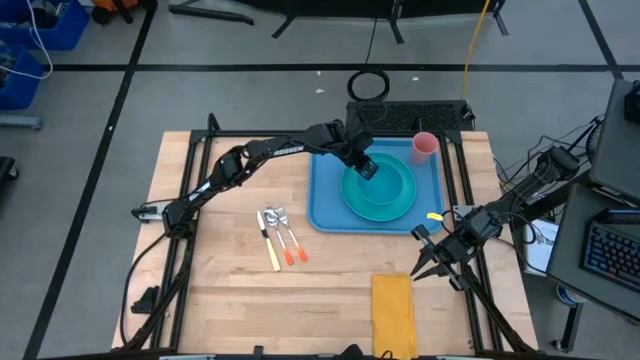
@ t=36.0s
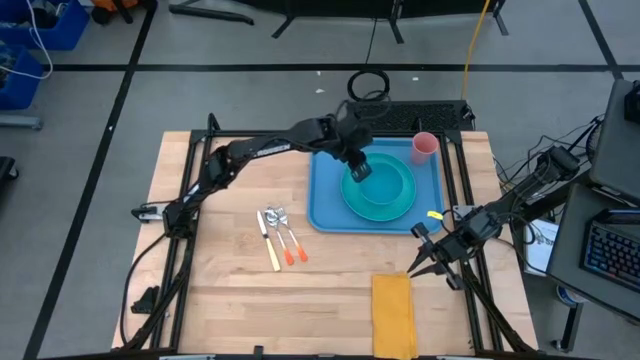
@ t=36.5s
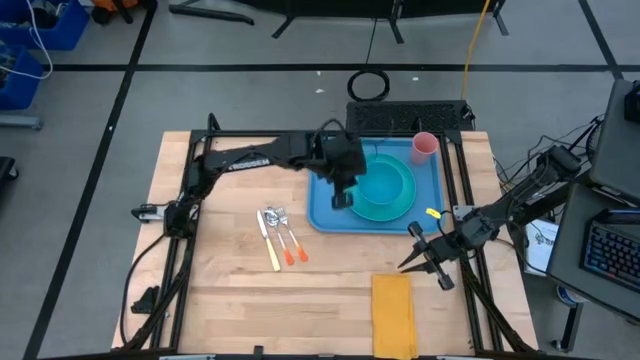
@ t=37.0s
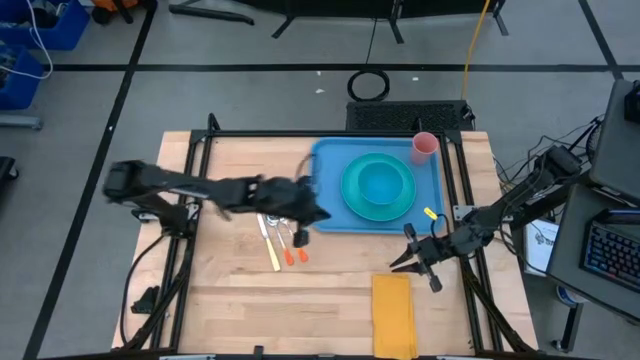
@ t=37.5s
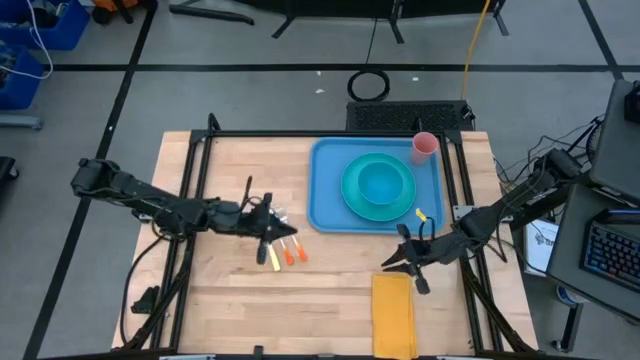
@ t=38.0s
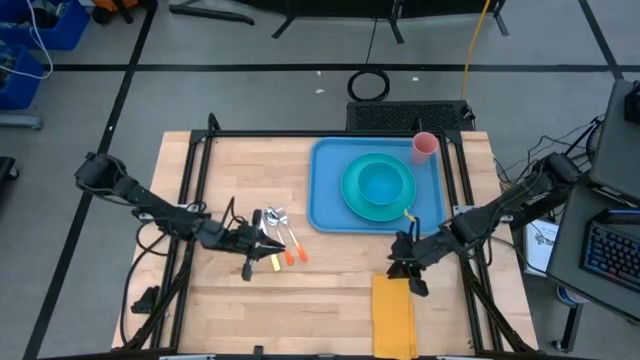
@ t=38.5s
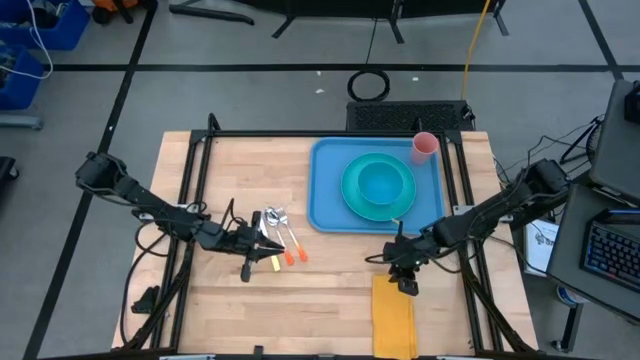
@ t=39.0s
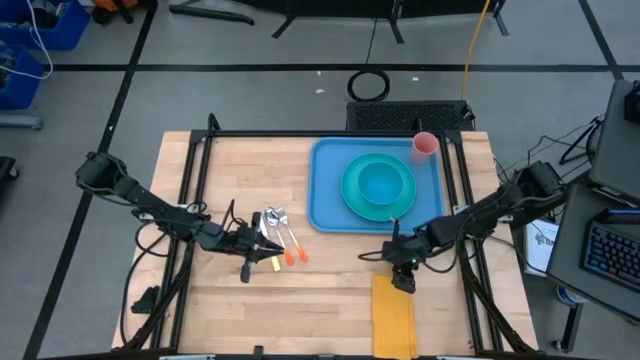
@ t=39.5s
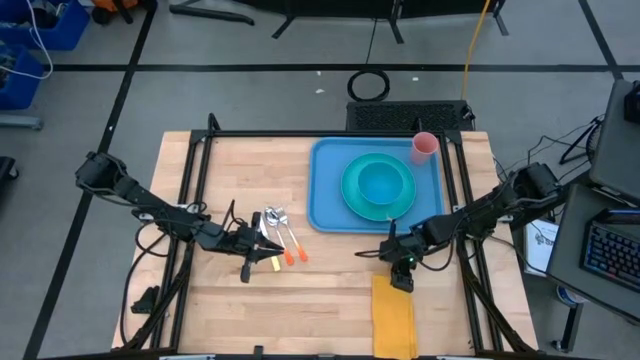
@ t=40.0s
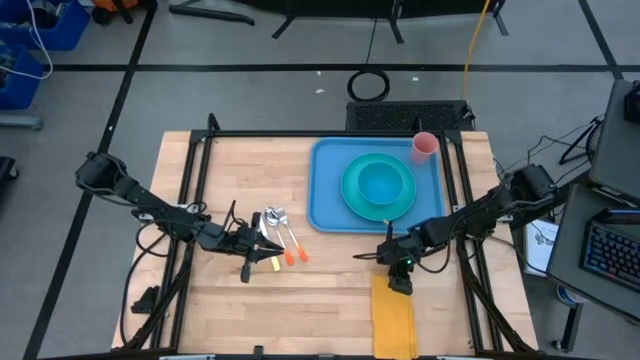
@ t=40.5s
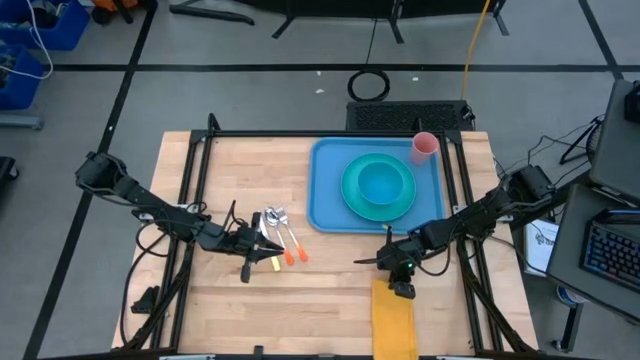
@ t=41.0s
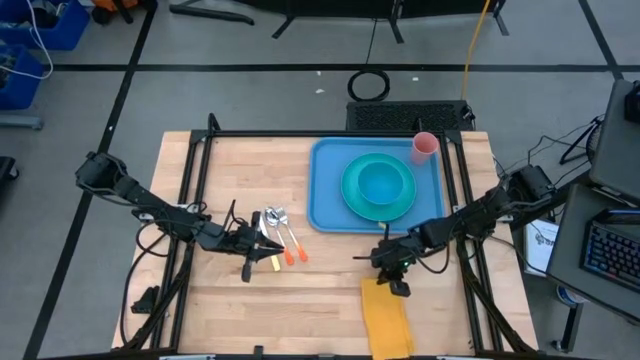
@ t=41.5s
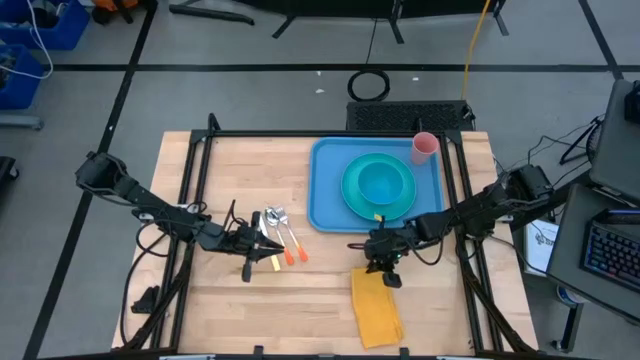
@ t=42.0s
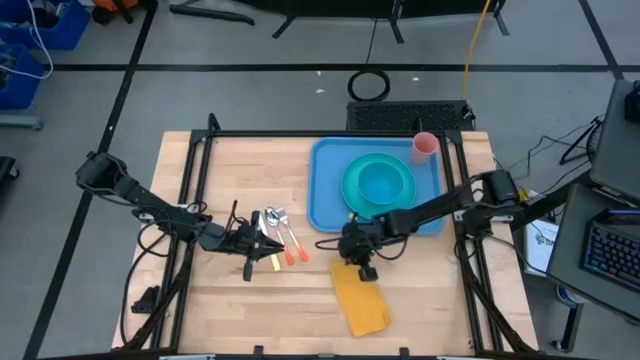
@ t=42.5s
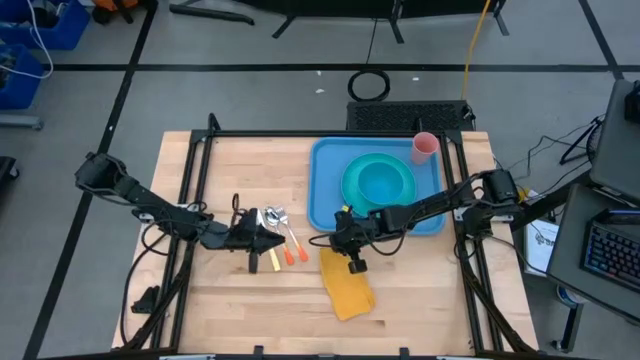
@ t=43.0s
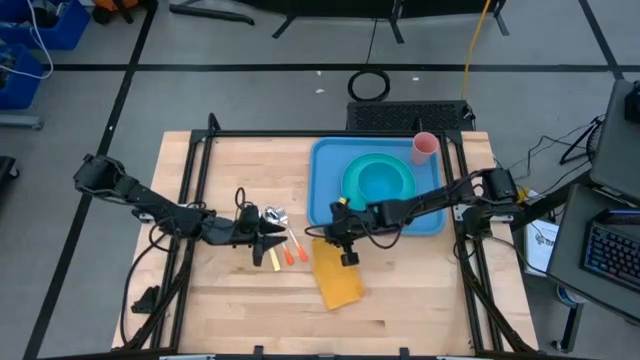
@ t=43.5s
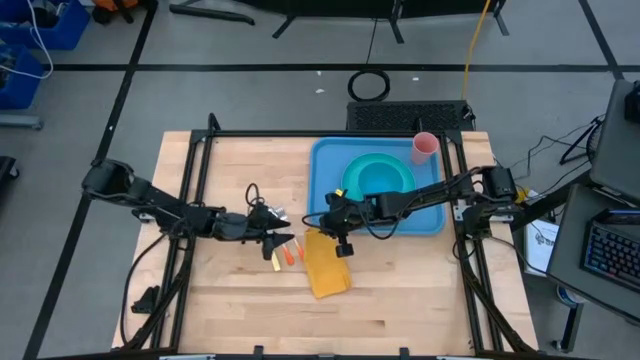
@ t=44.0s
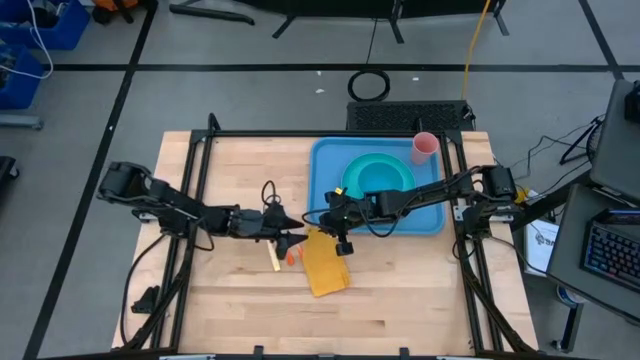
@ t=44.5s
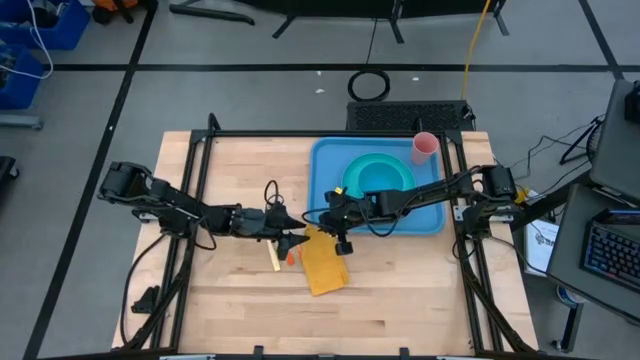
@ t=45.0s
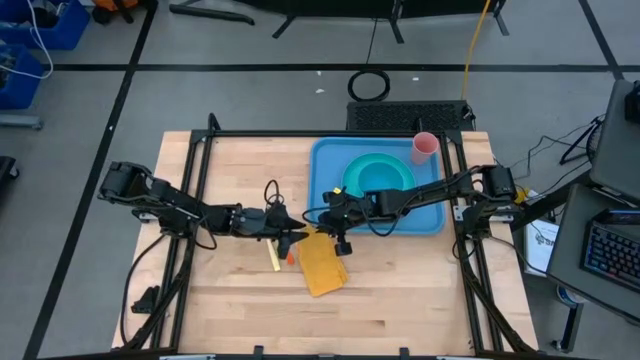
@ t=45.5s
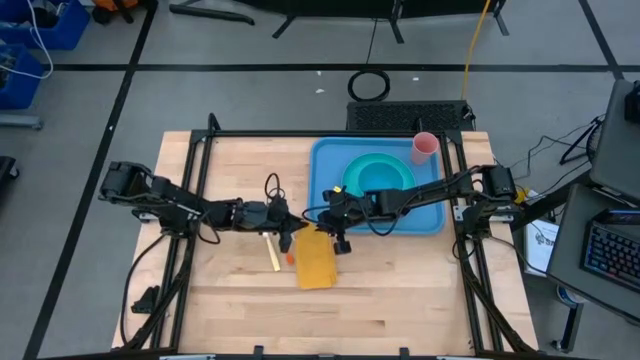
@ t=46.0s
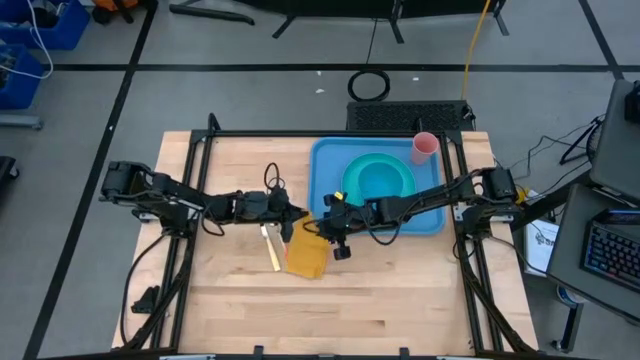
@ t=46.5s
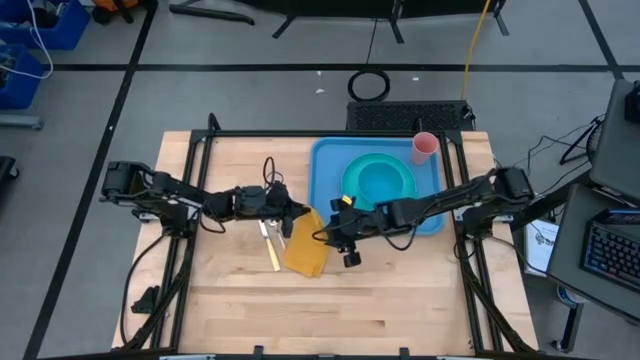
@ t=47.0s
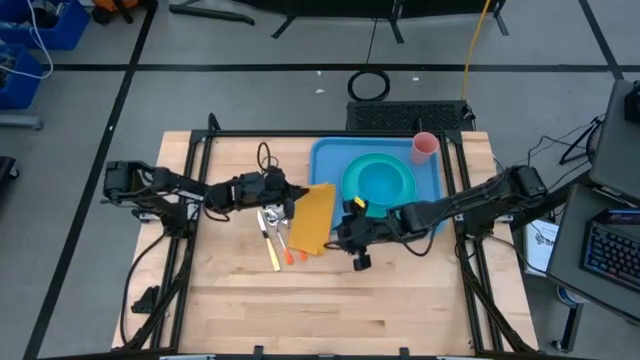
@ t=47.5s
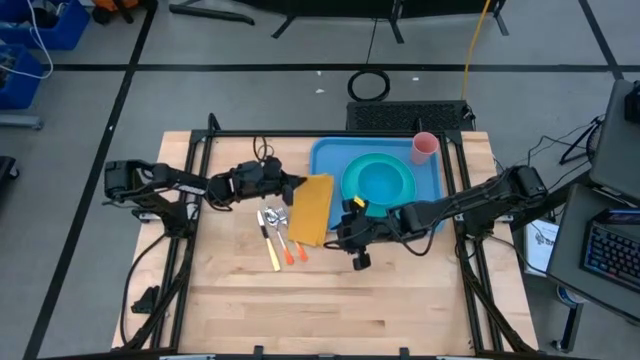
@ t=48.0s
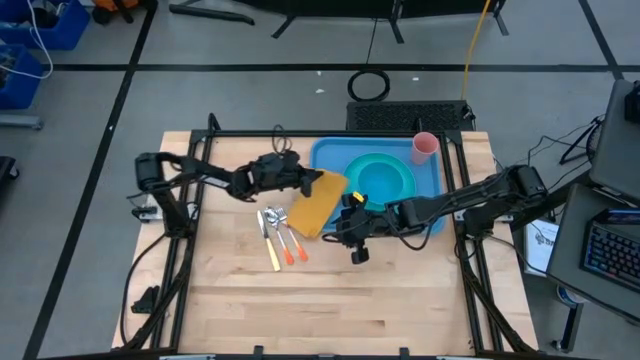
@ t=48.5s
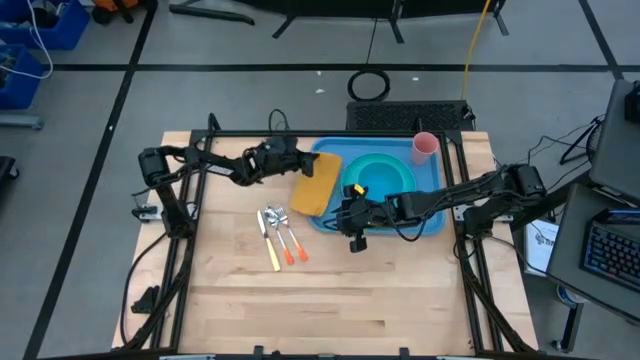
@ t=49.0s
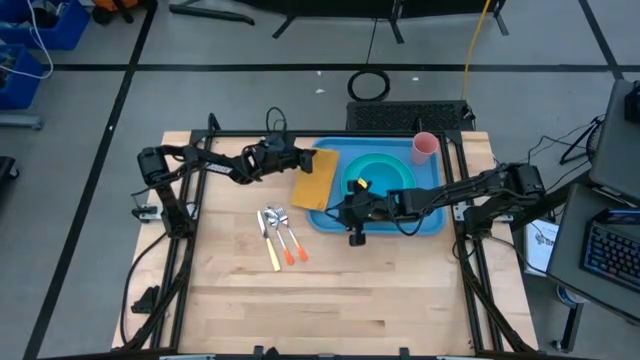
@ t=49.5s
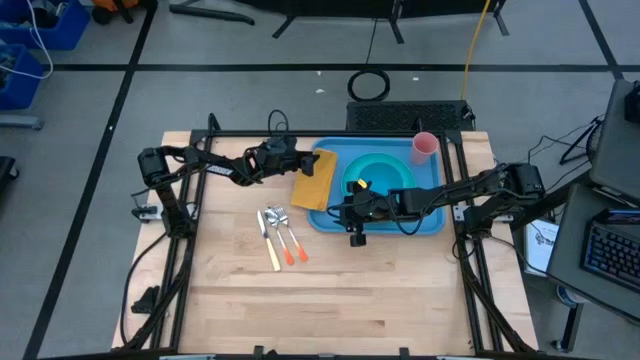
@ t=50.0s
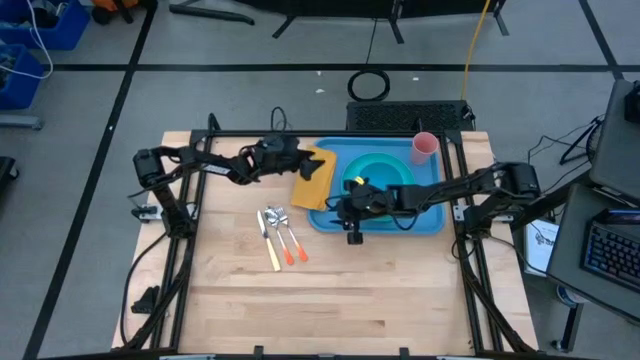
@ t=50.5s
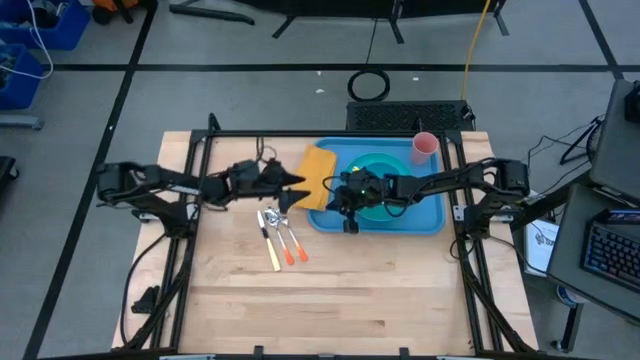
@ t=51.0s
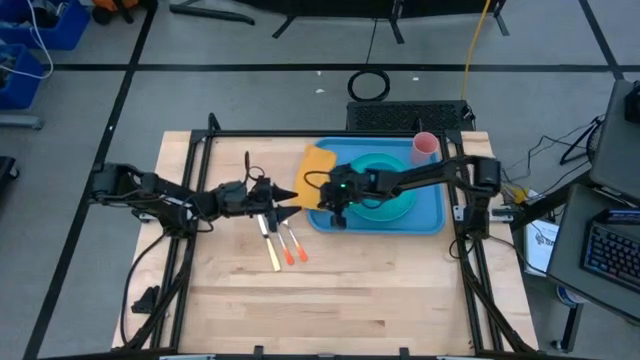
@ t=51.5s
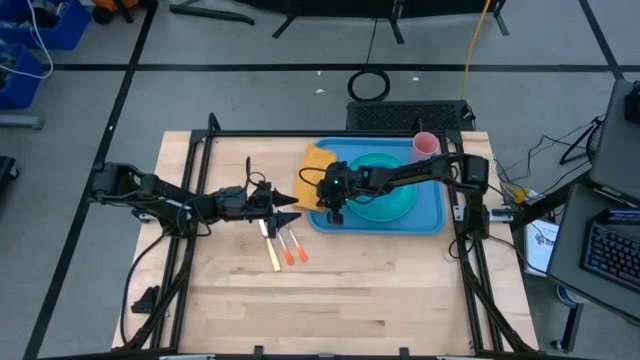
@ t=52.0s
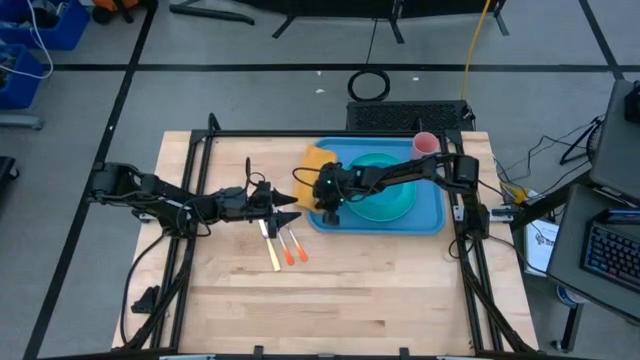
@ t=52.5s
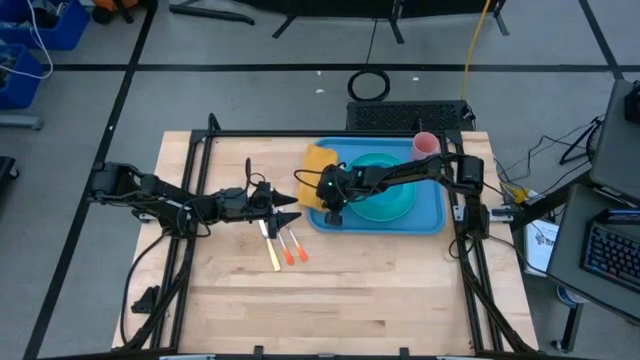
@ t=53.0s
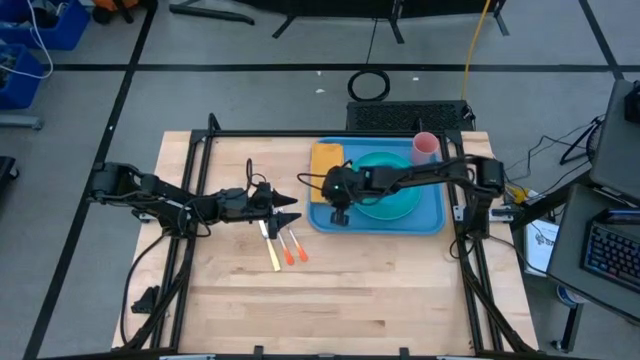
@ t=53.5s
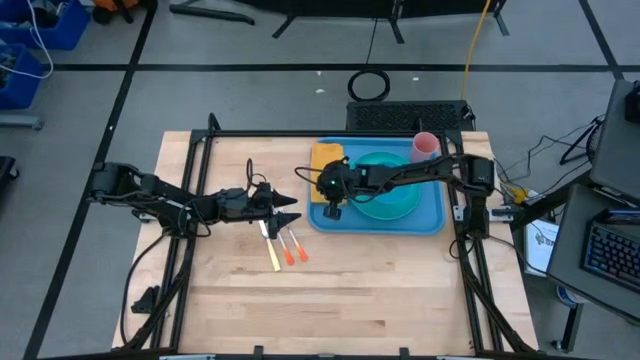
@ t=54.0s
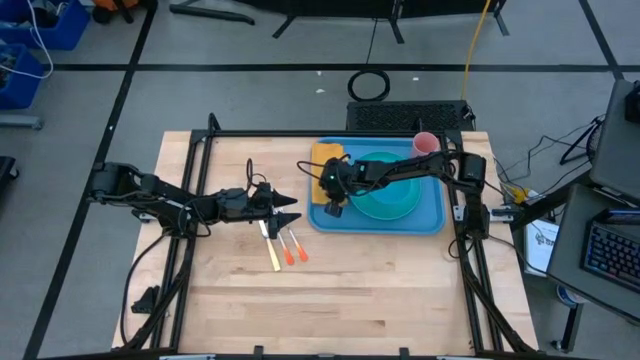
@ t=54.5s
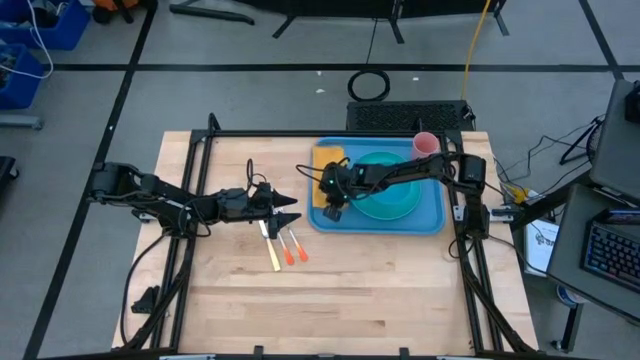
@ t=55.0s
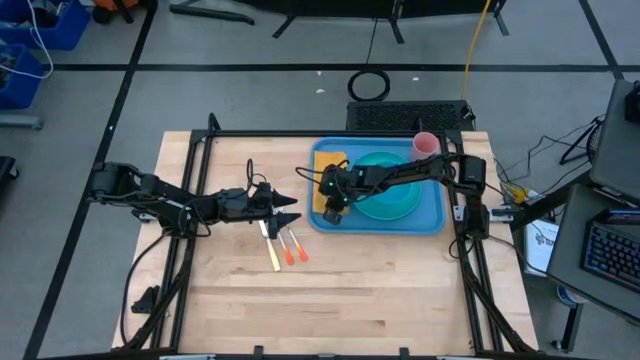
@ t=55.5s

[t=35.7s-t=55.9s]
Task: Set up tray
Put the orange napkin onto the blue tray
